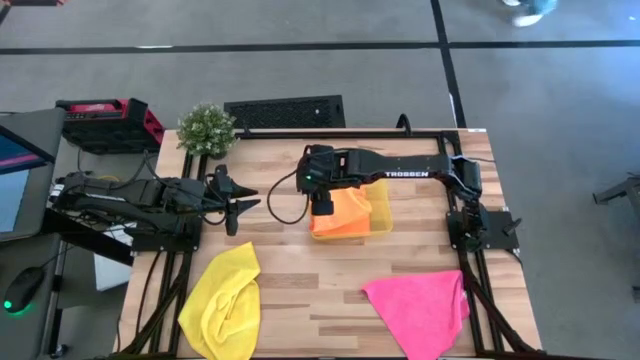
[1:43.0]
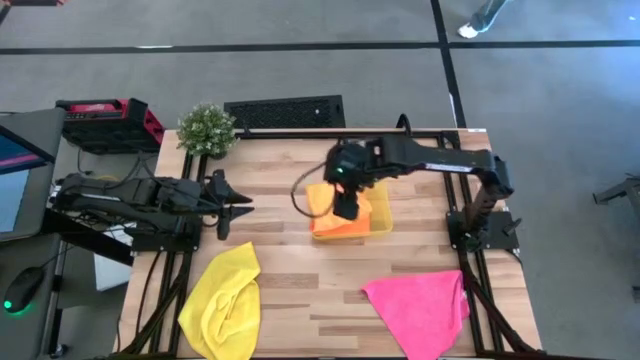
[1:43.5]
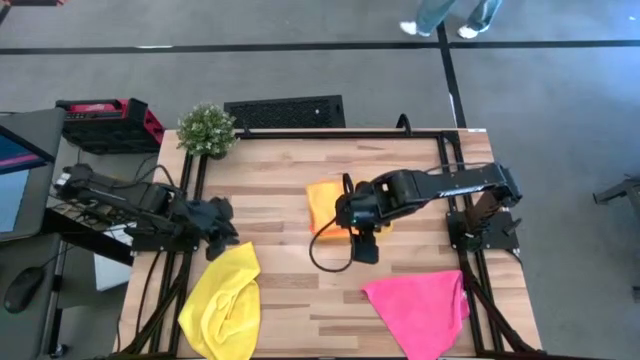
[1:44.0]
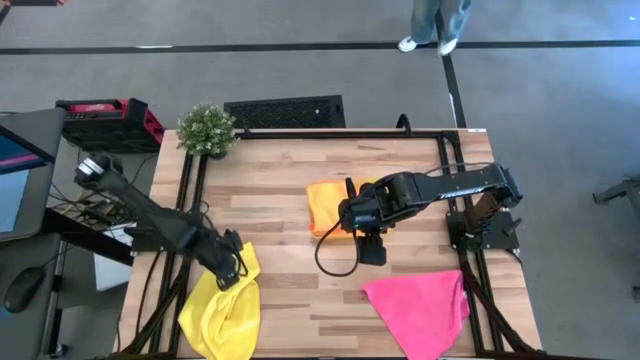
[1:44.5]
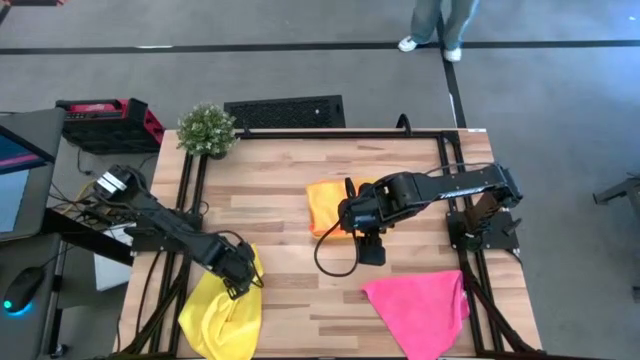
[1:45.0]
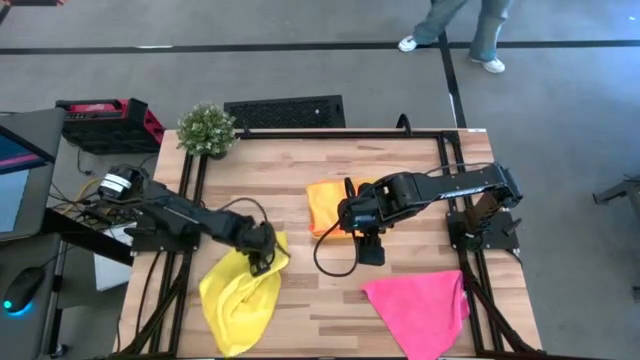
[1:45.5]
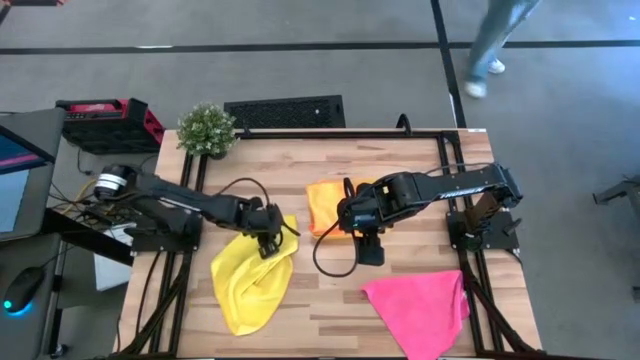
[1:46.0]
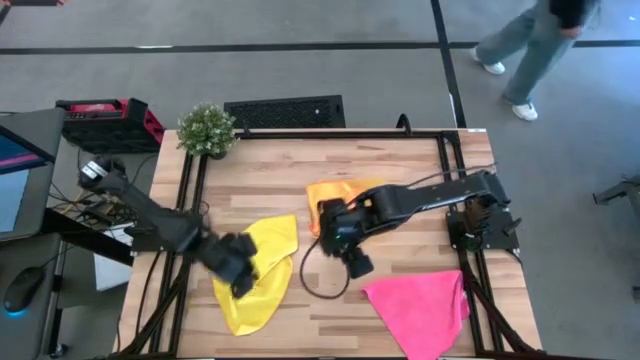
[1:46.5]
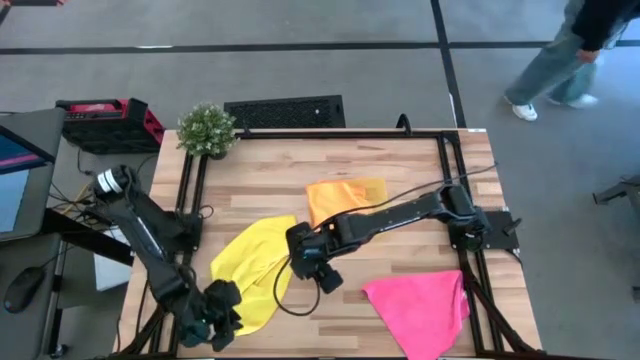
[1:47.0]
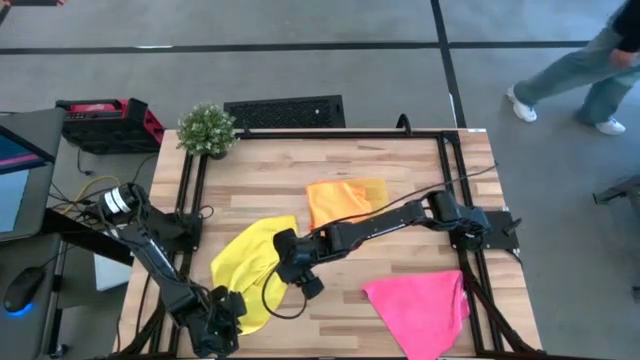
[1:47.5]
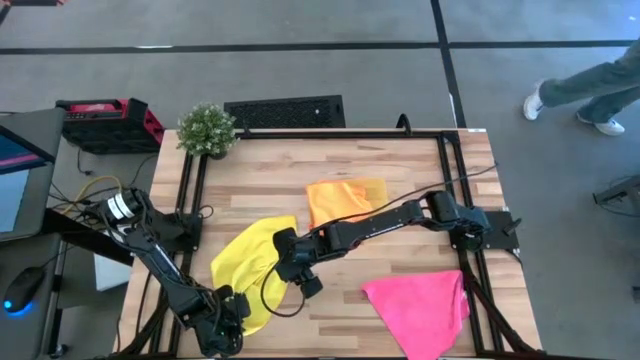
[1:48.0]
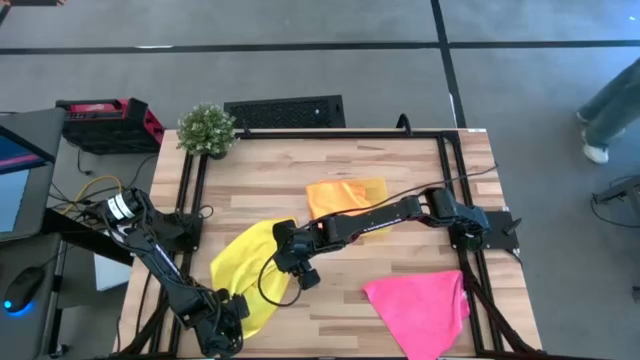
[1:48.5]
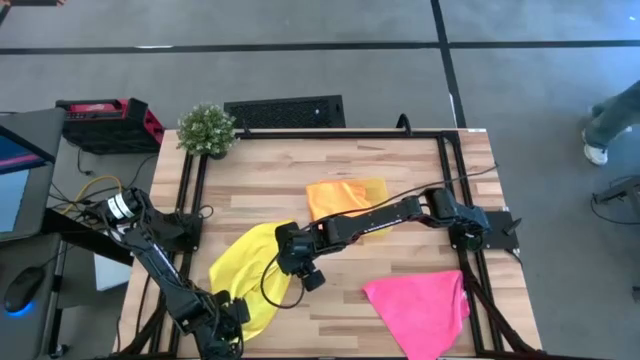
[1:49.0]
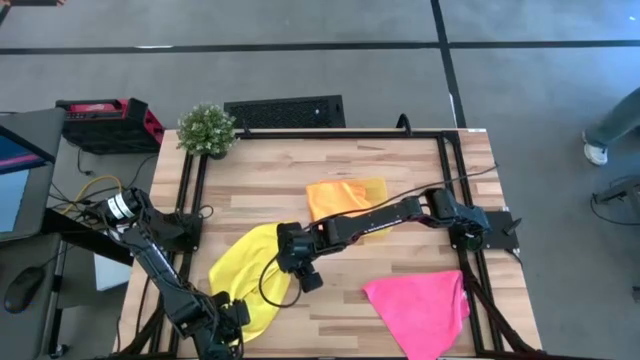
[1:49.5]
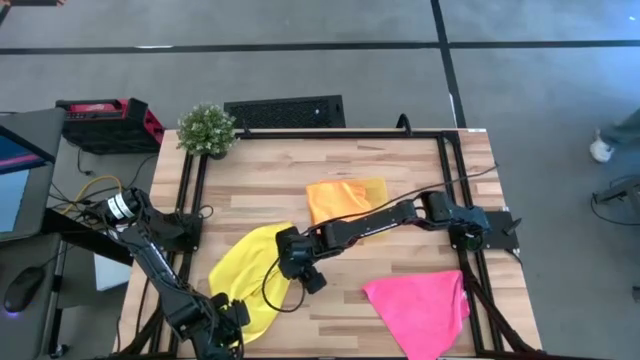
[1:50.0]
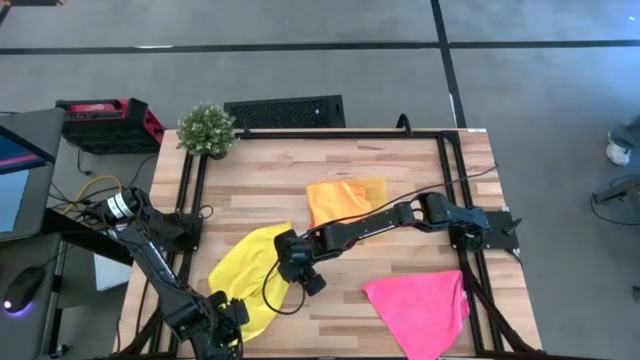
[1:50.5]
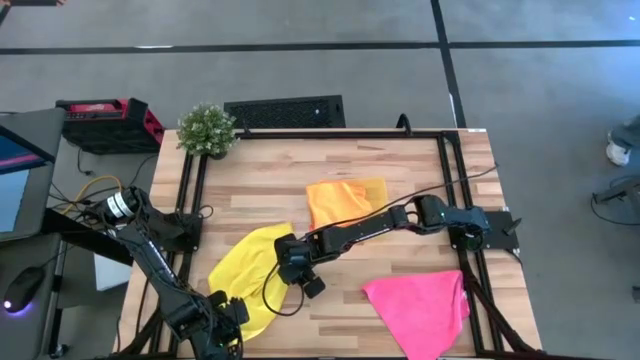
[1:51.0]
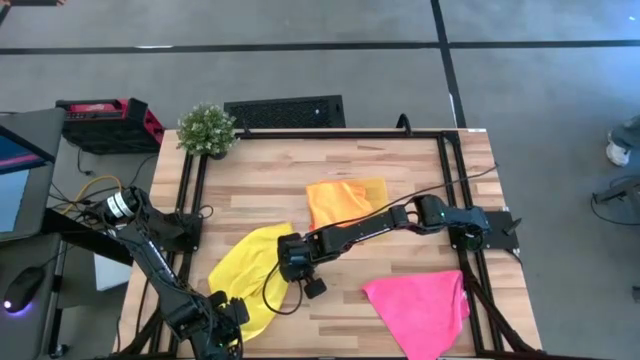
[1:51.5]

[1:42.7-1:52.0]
Task: Fold microfiber towels
Fold the yellow microfiber towel

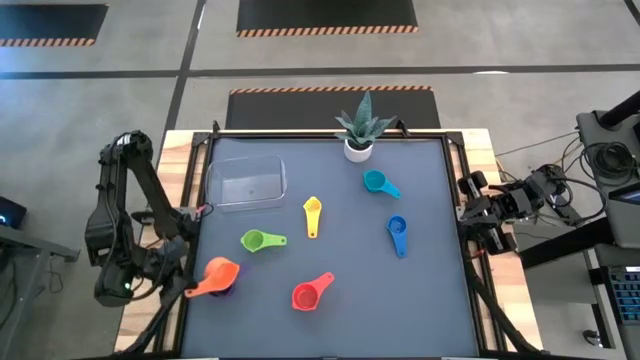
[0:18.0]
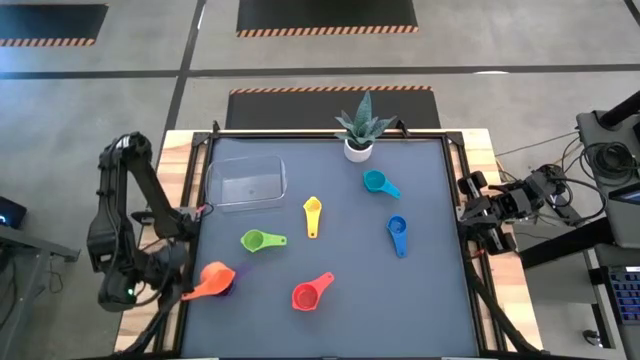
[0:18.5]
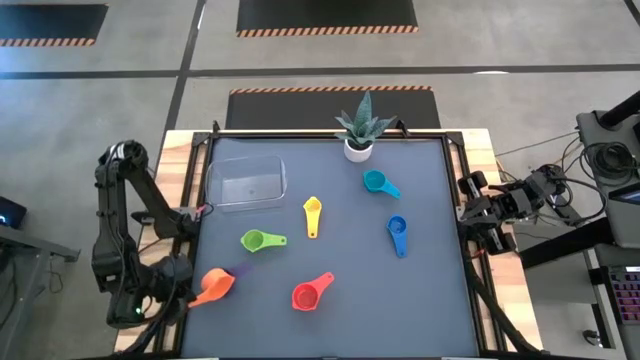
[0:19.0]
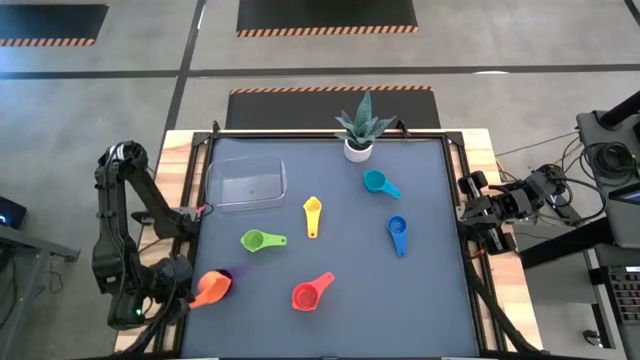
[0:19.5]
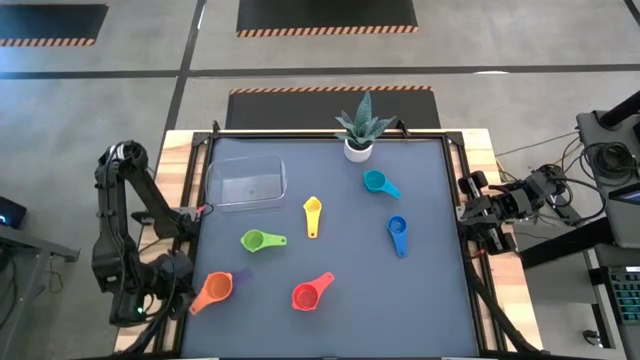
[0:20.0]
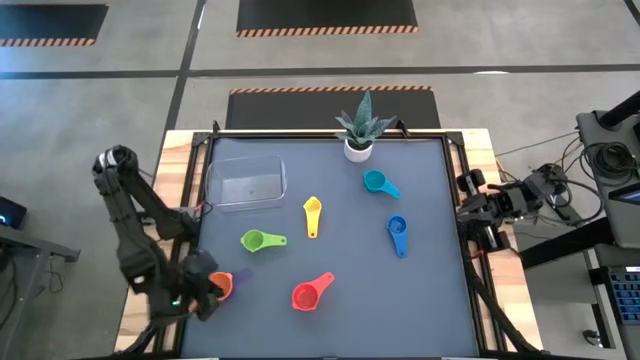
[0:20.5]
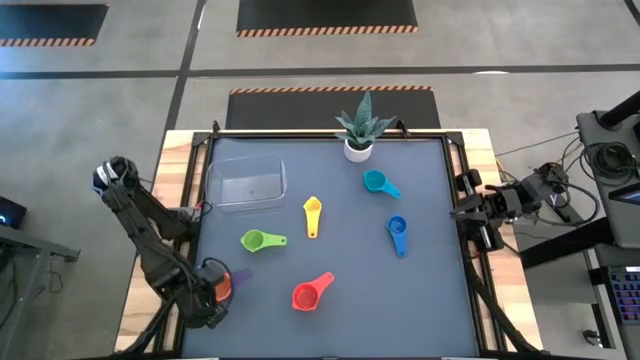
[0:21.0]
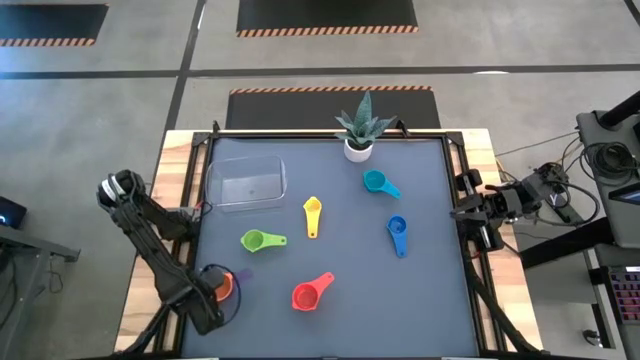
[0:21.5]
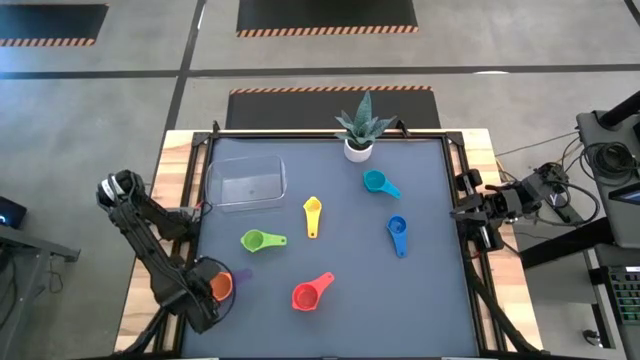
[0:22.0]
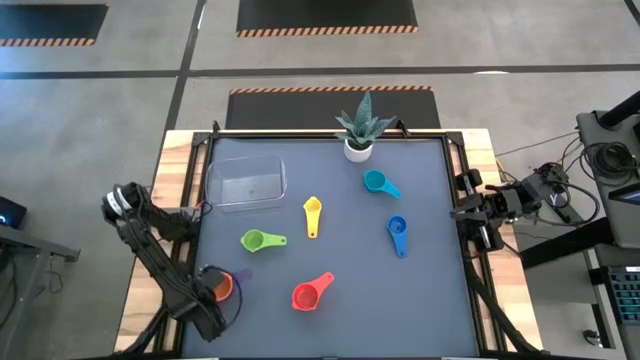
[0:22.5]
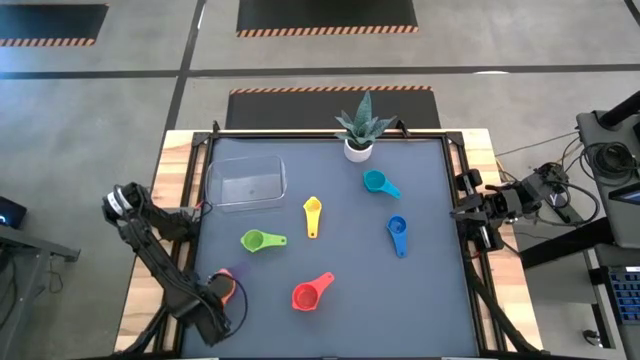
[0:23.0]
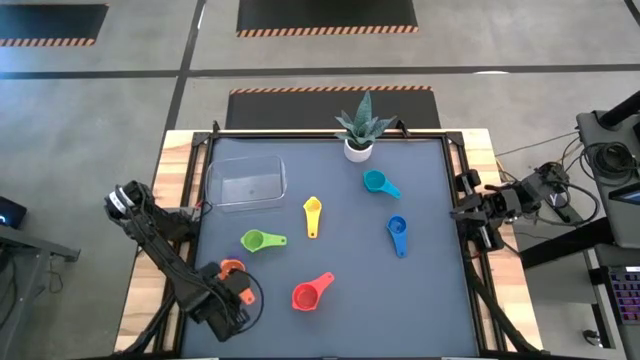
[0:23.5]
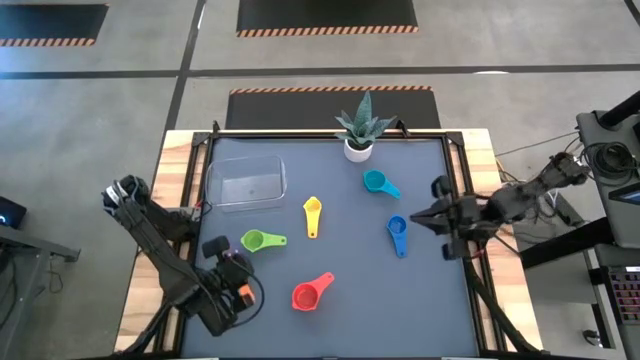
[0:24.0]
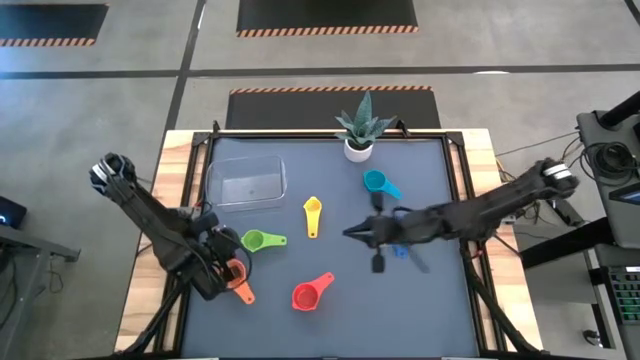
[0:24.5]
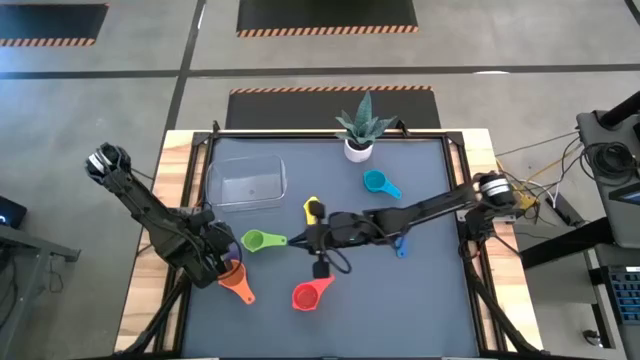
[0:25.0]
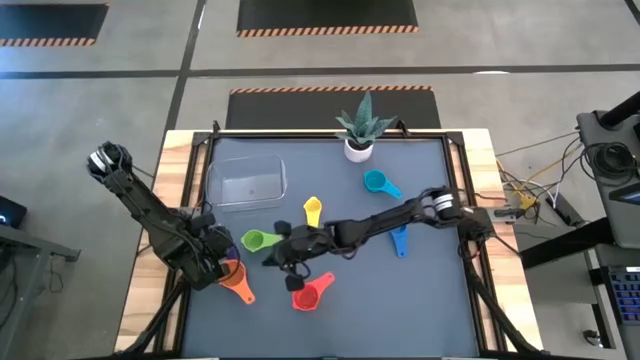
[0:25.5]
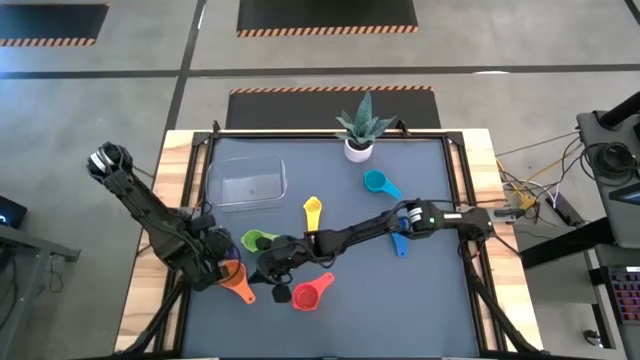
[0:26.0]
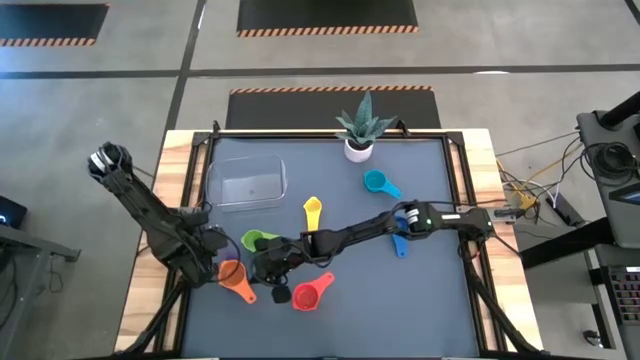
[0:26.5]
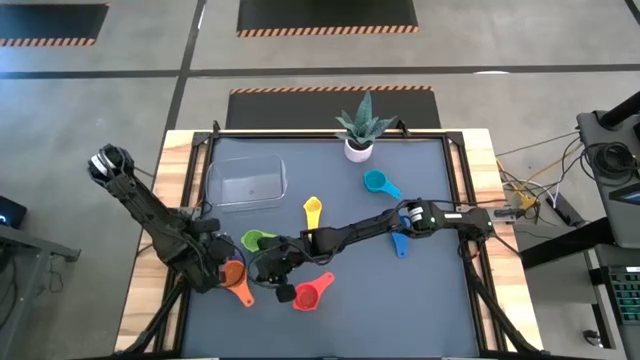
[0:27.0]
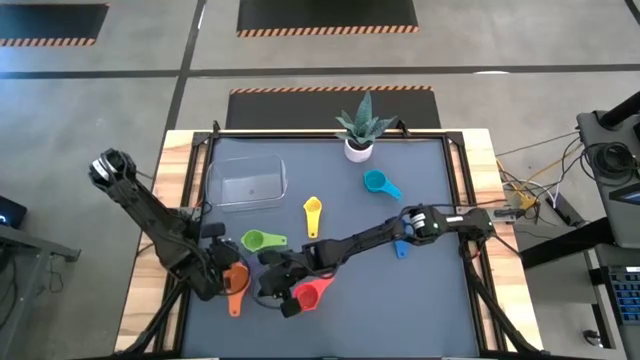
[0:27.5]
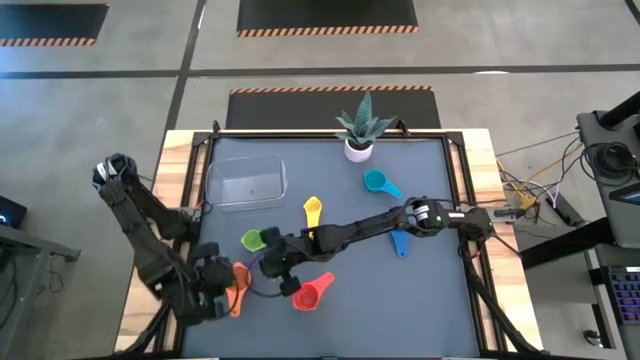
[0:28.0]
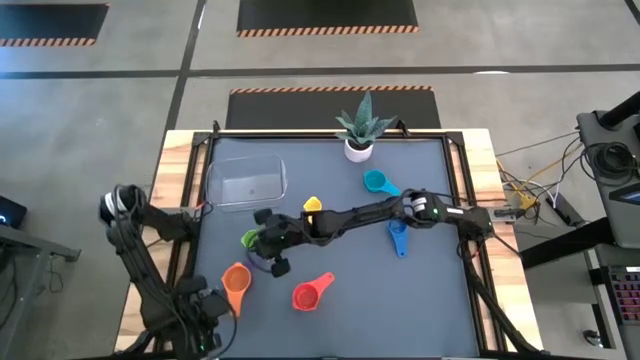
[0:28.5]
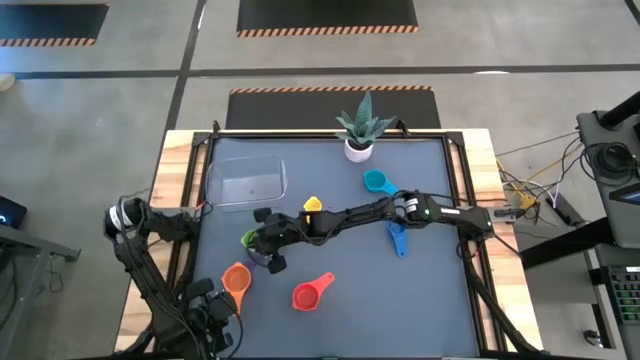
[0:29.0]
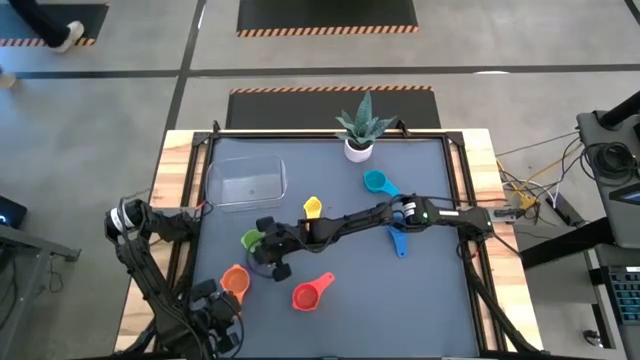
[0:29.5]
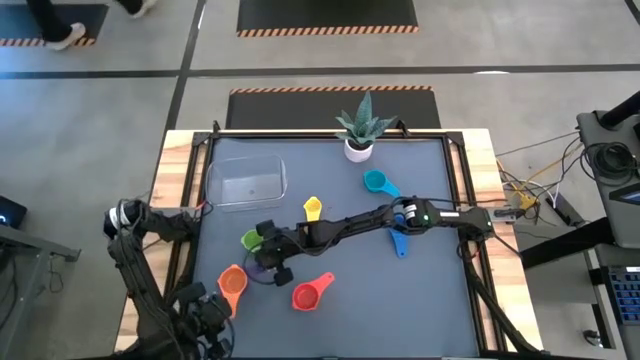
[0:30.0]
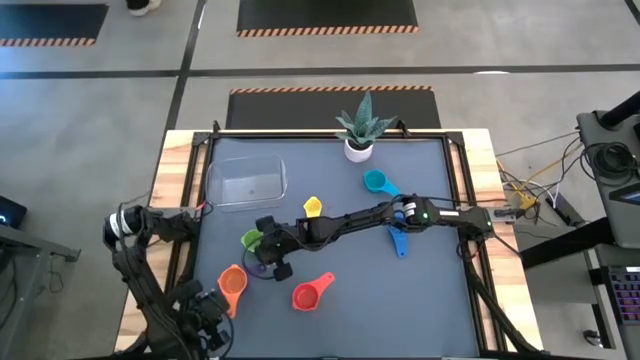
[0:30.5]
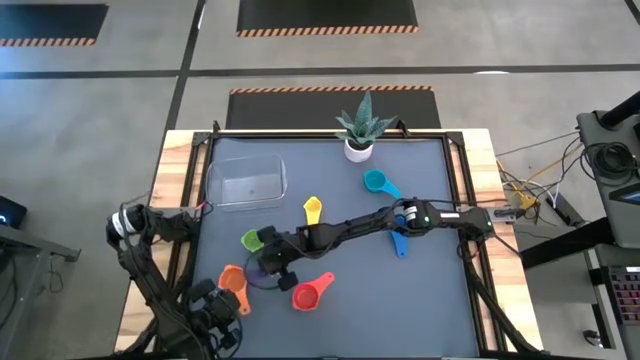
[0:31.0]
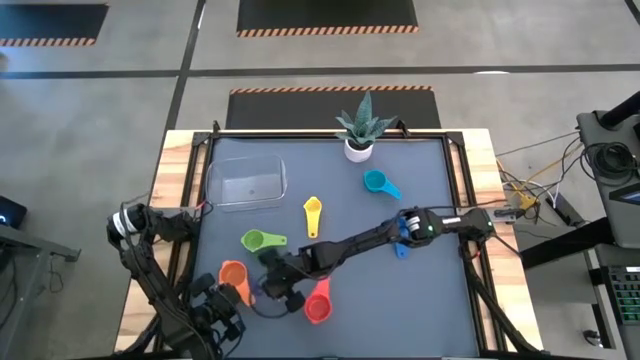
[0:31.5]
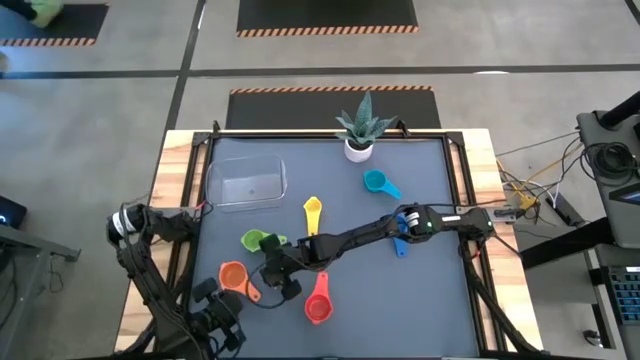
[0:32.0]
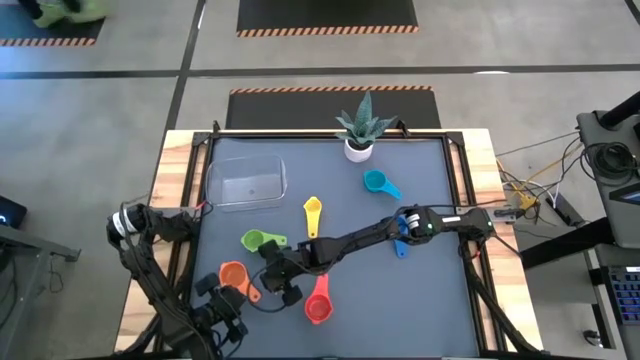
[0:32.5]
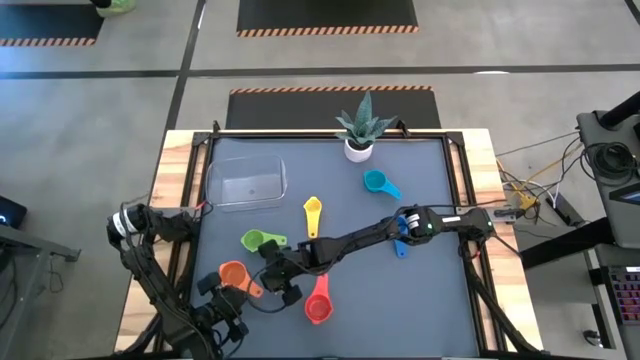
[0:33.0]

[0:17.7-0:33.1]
Task: Nest measuring cups in basket
Stack the orange measuring cup on top of the violet measuring cup
